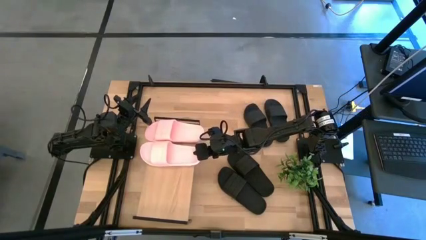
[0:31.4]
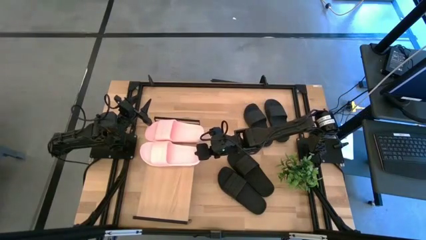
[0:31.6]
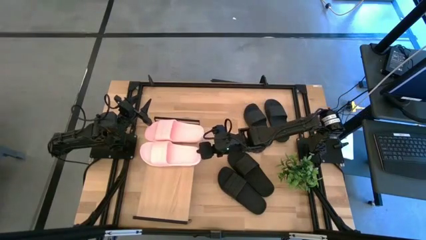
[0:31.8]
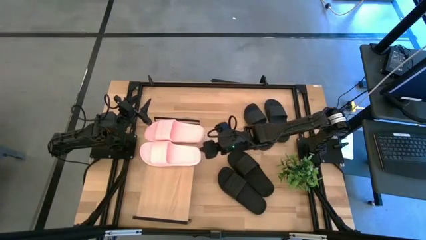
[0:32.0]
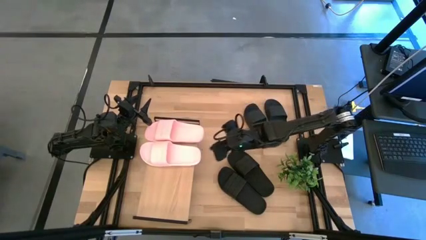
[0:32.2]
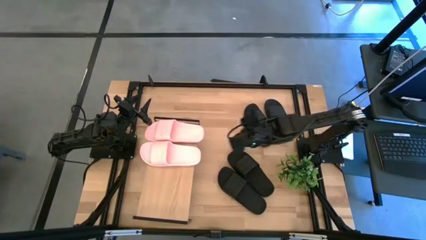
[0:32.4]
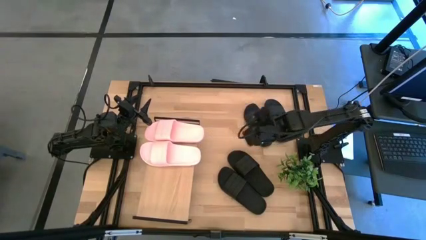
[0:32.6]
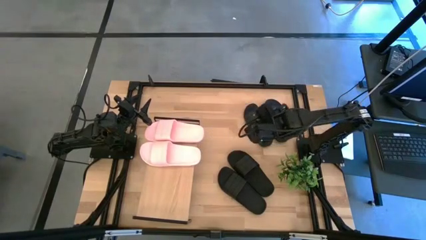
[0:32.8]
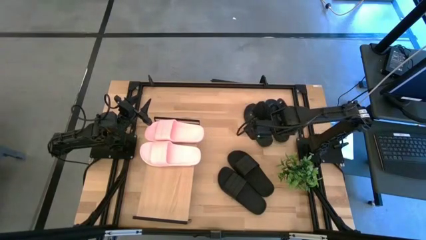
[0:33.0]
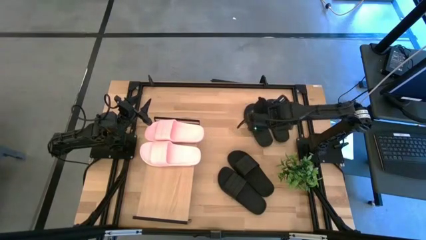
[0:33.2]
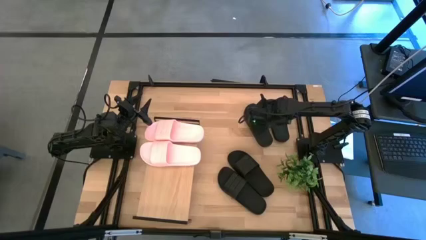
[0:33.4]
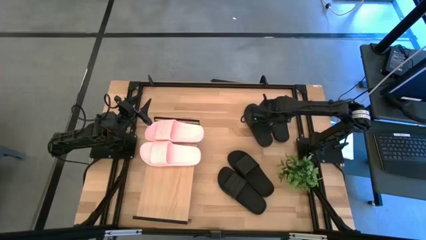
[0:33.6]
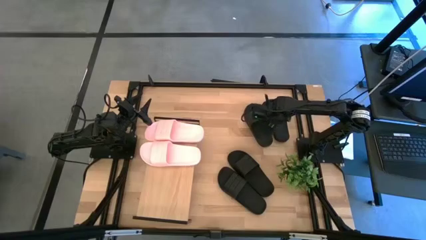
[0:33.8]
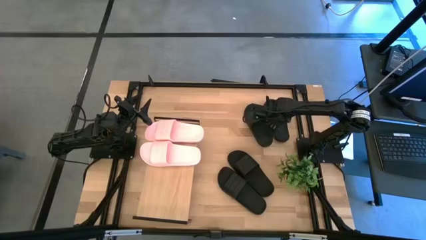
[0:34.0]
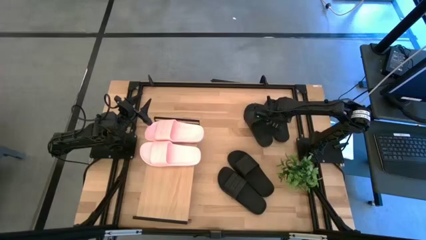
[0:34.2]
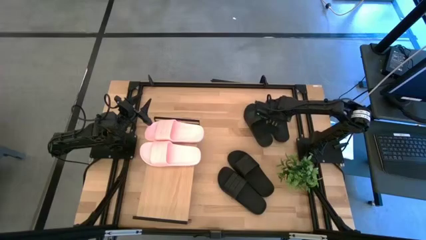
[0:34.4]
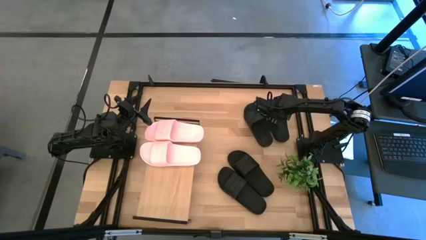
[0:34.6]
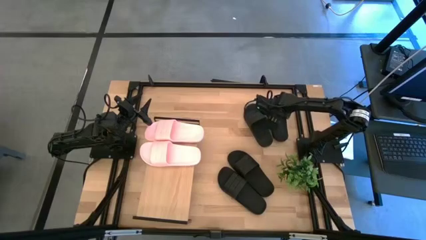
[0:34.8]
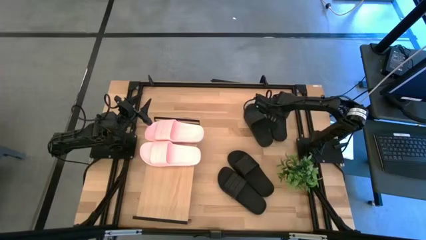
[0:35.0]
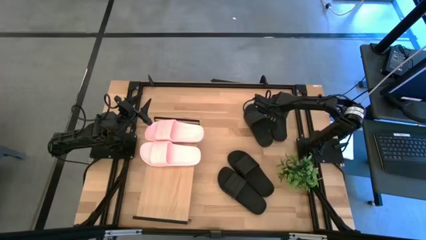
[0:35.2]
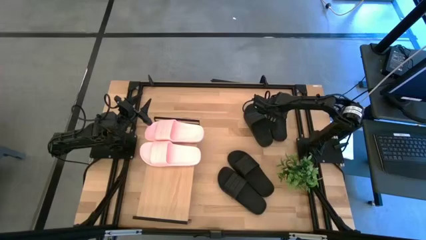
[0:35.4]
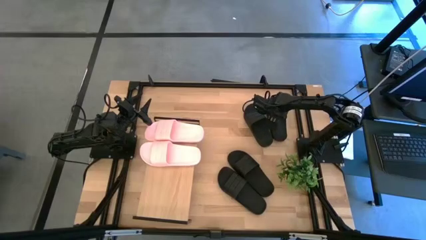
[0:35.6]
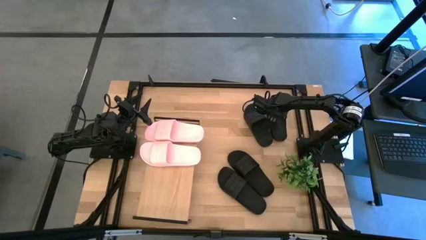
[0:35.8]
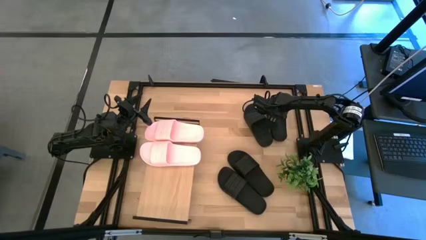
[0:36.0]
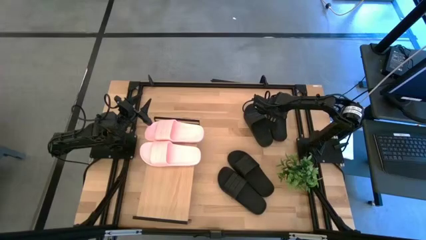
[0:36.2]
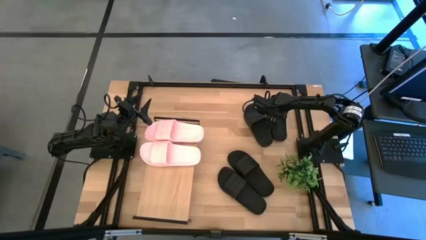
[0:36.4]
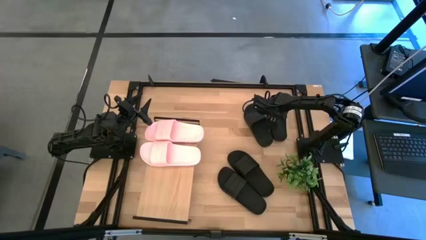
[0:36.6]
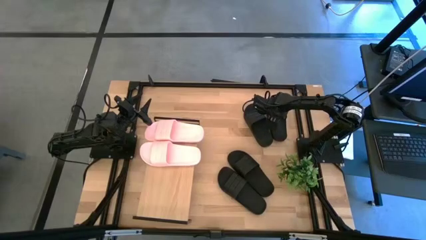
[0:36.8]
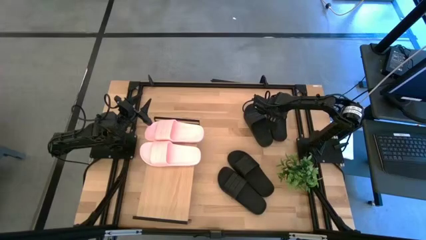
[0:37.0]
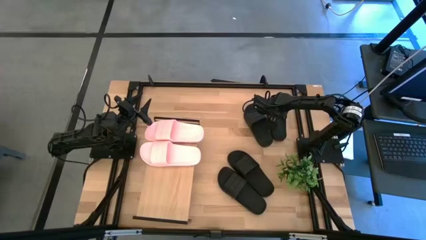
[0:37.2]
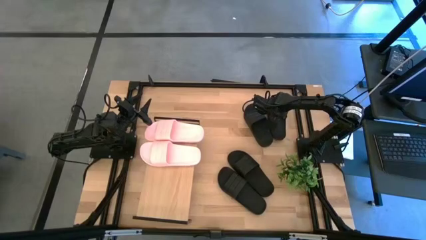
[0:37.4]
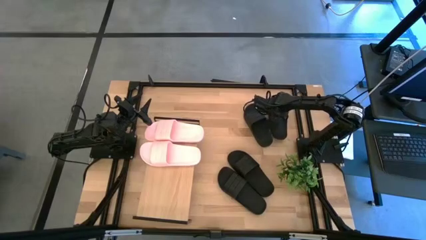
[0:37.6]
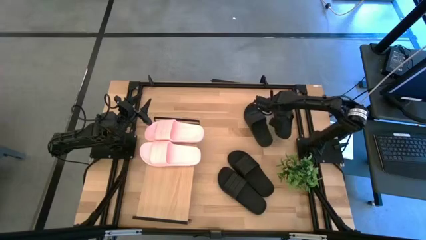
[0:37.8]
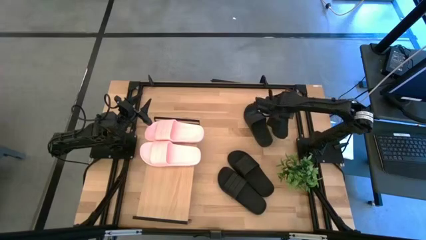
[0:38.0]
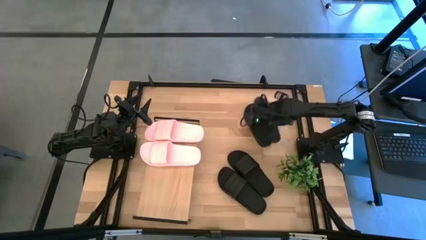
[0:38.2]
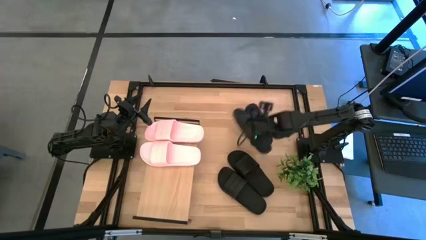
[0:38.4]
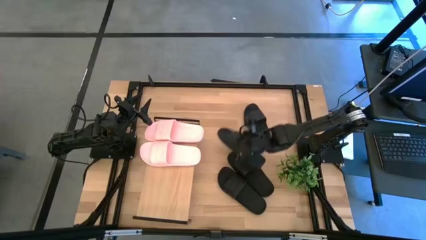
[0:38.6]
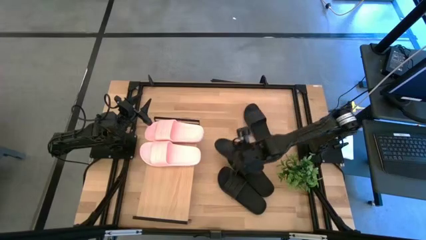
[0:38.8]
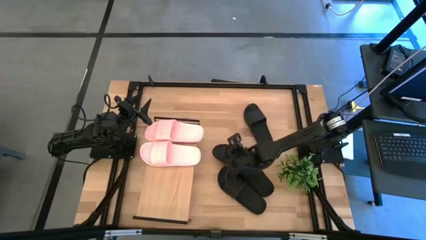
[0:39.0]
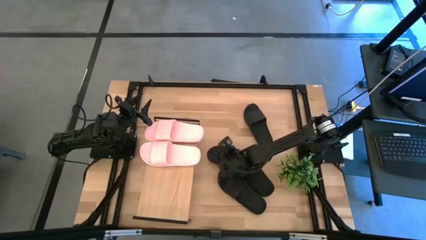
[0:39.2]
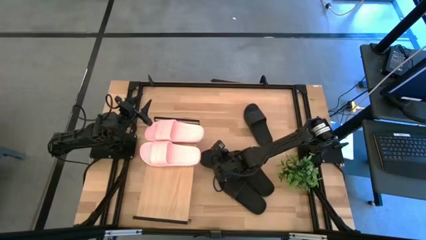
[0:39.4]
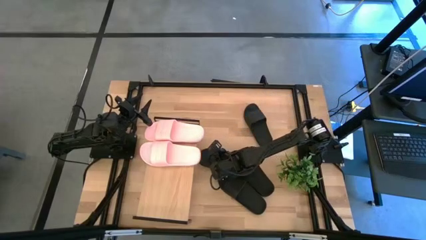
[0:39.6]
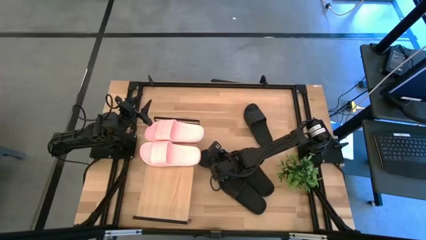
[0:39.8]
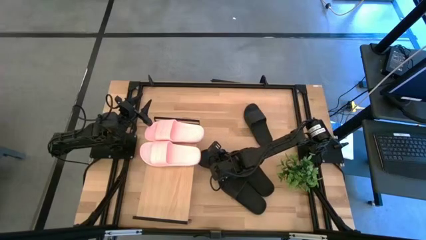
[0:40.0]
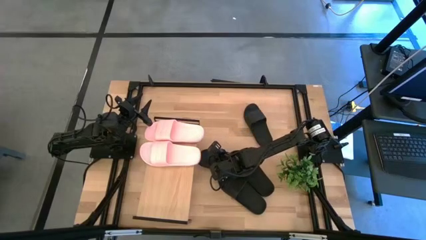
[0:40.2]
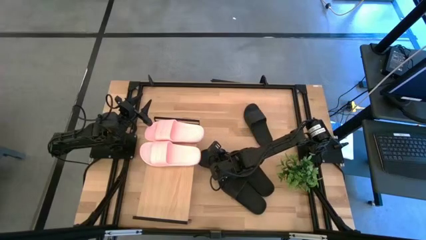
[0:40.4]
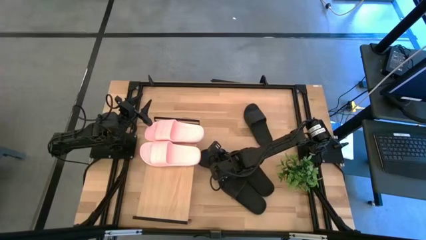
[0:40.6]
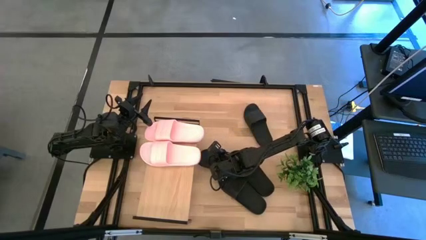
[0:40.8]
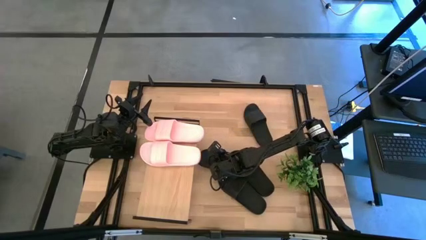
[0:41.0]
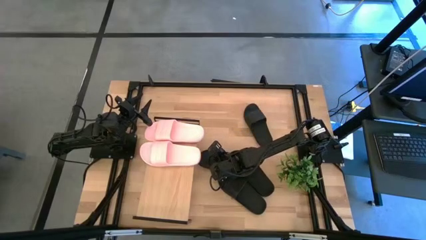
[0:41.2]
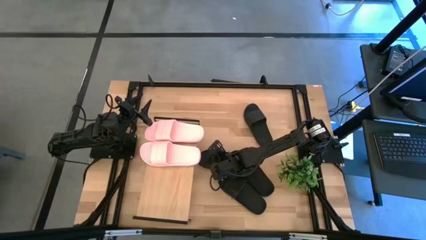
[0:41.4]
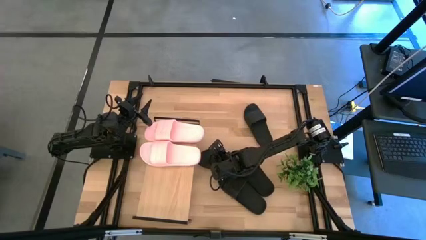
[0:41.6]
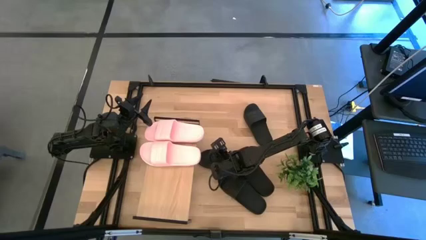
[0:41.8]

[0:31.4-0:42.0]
Task: Pick and place slides into the shelf
Put the black slipper under the shelf

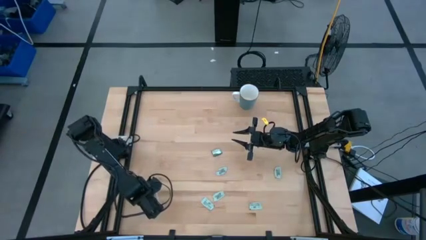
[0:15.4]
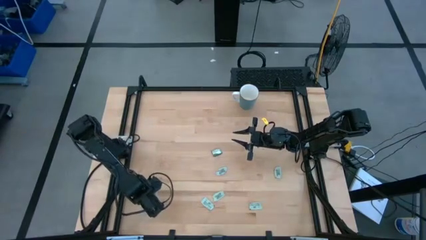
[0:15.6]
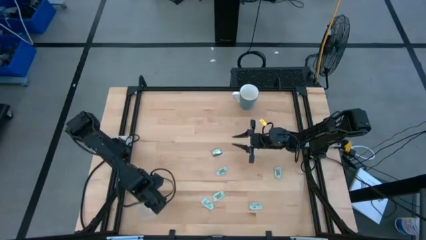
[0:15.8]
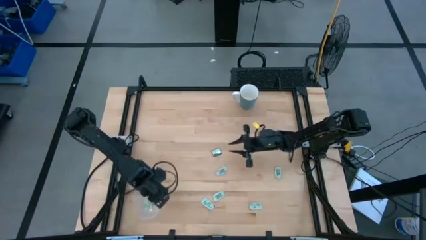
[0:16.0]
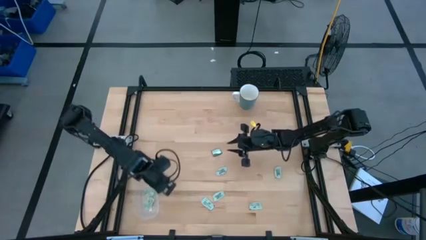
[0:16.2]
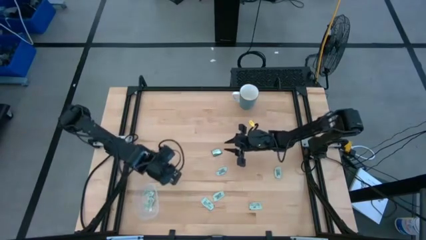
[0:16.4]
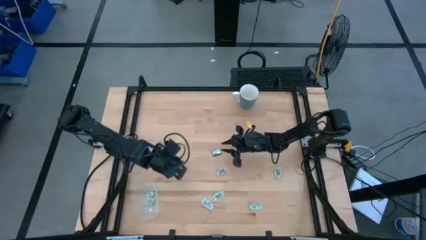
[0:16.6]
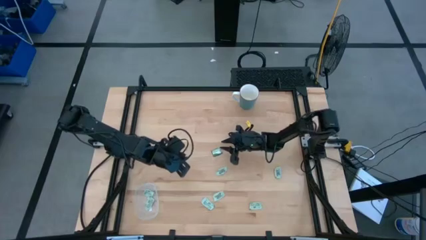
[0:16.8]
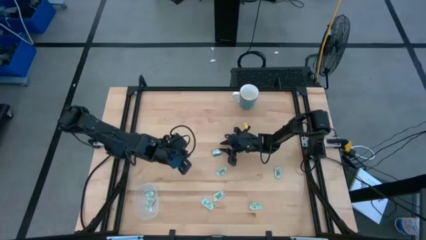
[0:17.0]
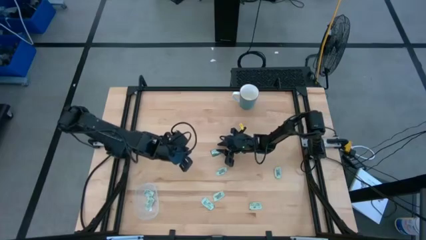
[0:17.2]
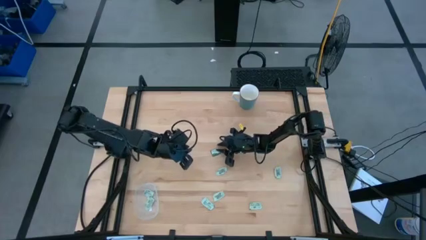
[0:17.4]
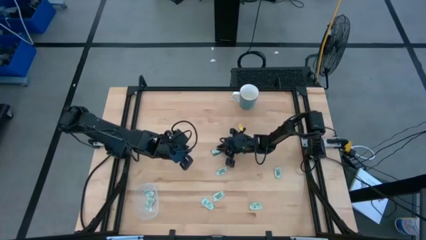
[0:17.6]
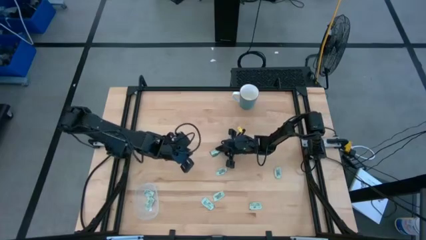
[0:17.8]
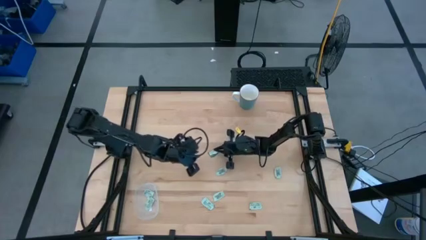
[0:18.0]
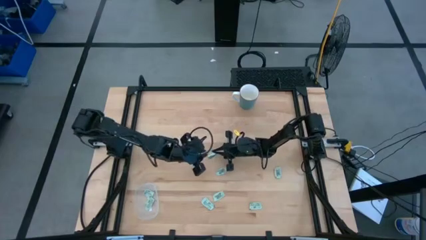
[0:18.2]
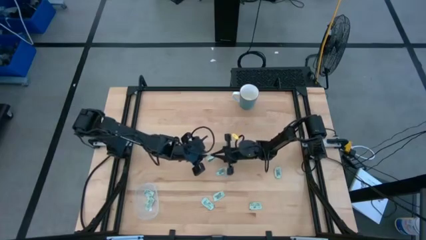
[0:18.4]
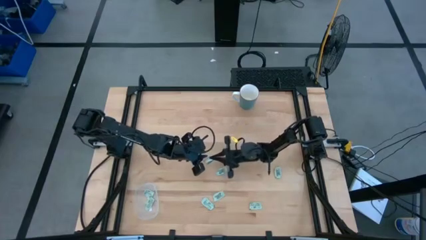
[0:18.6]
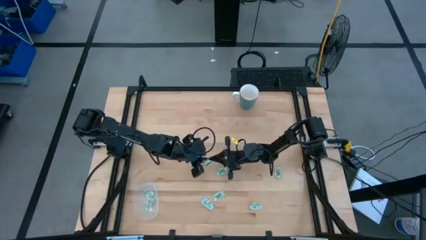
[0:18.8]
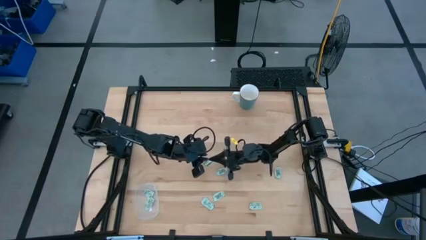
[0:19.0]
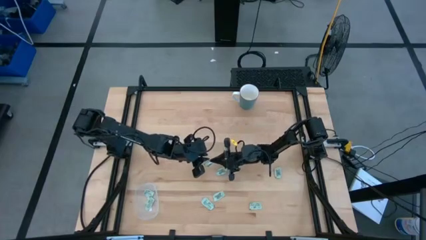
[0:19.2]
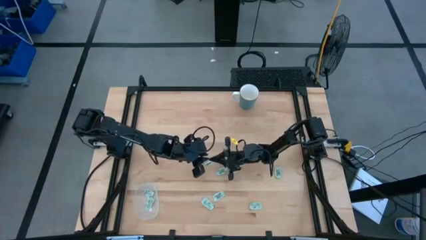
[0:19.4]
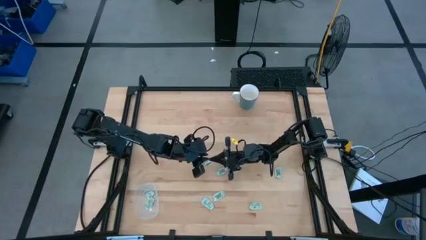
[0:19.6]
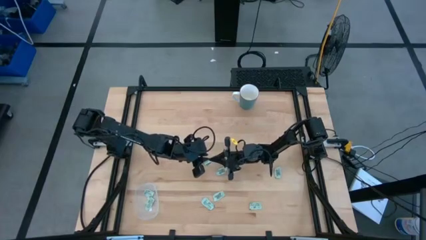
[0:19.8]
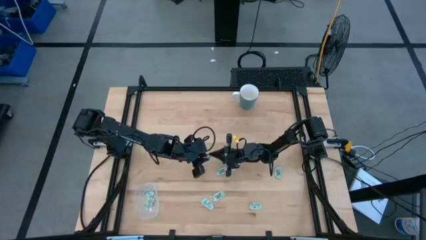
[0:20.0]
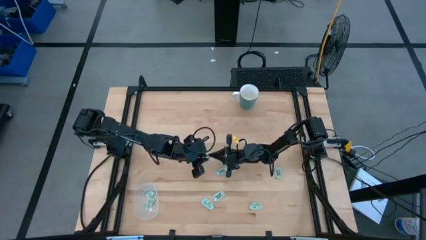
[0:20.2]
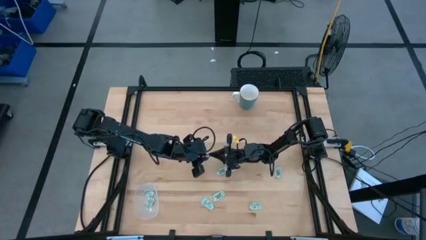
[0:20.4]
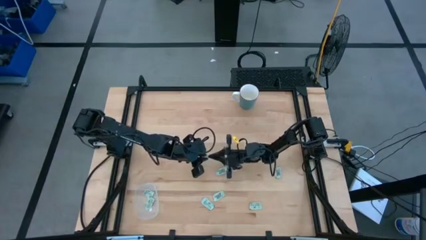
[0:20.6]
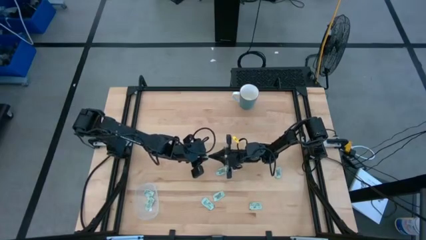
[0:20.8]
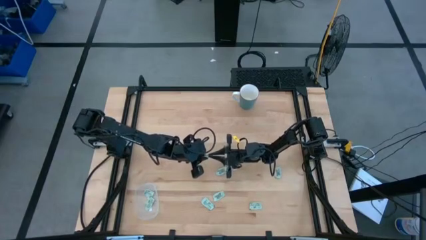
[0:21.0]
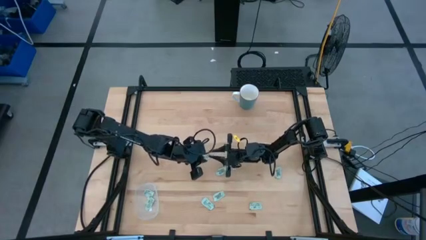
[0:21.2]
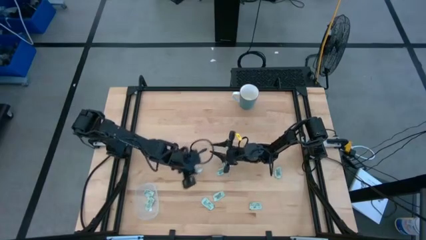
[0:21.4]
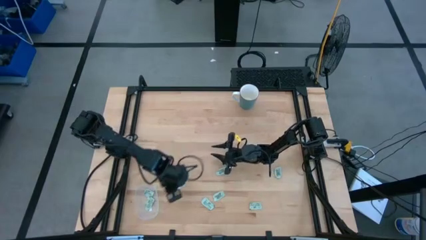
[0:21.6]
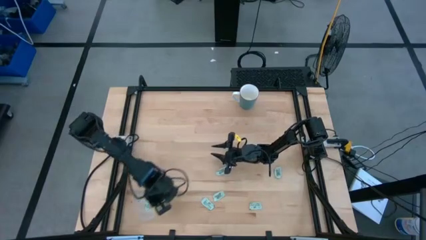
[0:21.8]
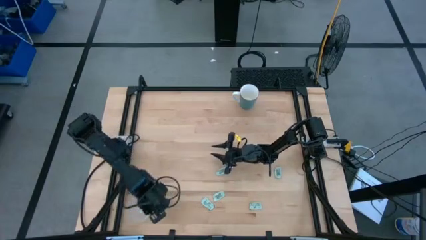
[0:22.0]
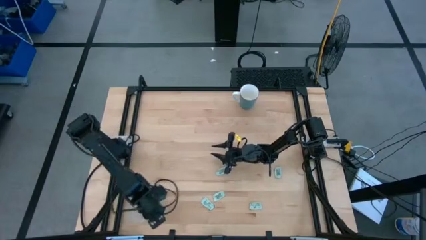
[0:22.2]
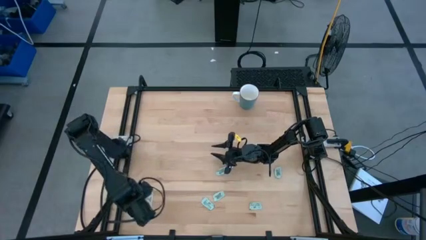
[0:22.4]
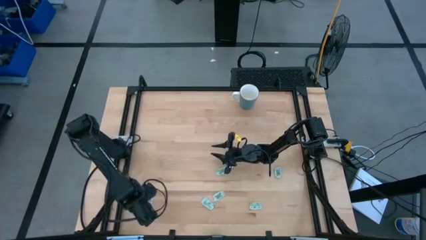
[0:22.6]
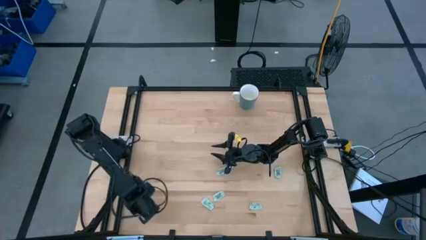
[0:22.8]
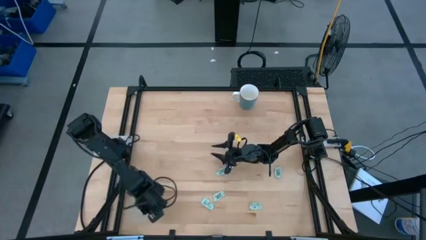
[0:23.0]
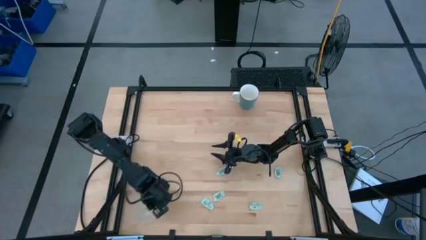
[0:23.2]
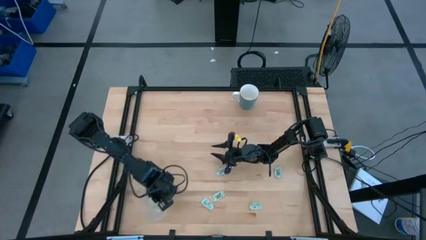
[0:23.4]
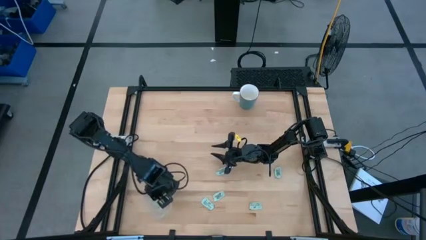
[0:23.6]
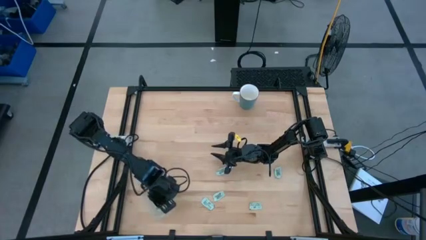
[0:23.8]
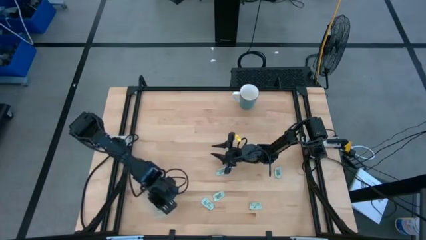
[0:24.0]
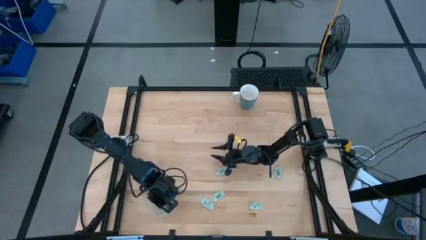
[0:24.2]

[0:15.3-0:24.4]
Task: Pick and place Stevia / Truvia into bins
Put the truvia packet into the transparent container
